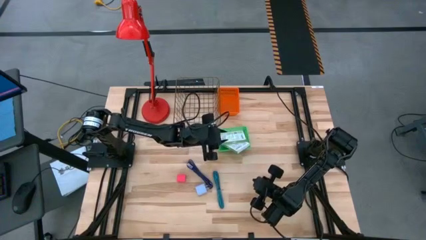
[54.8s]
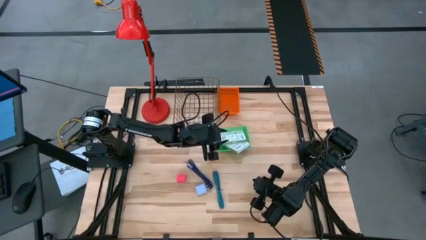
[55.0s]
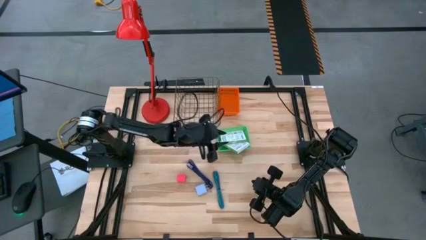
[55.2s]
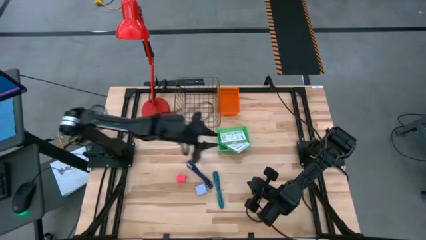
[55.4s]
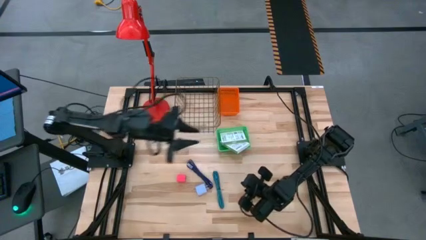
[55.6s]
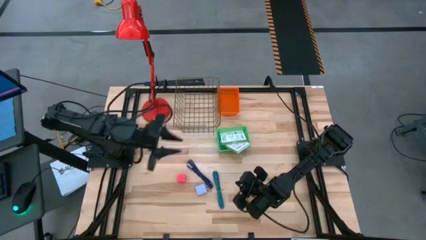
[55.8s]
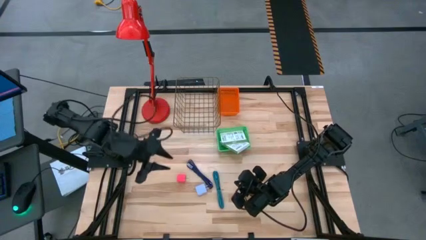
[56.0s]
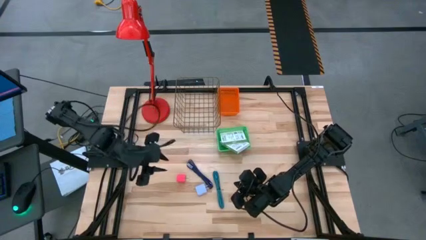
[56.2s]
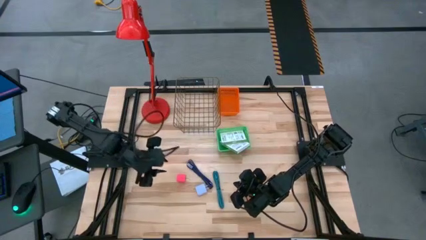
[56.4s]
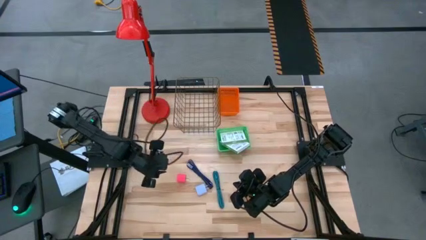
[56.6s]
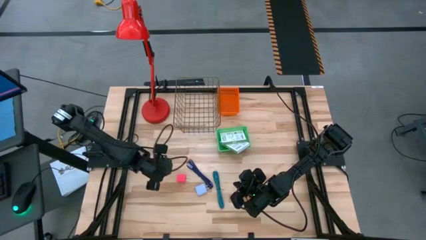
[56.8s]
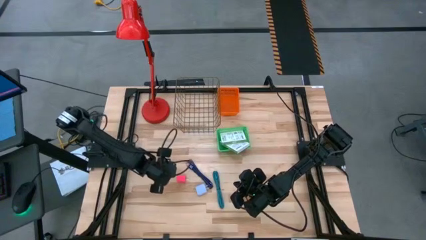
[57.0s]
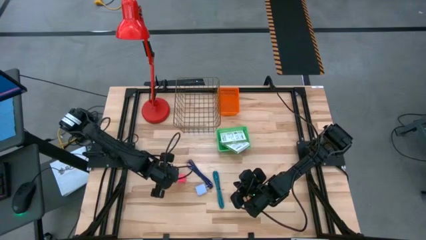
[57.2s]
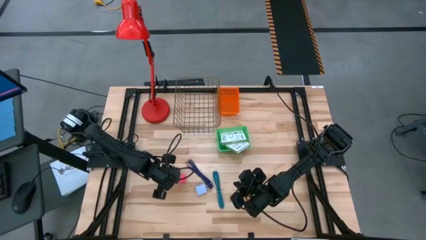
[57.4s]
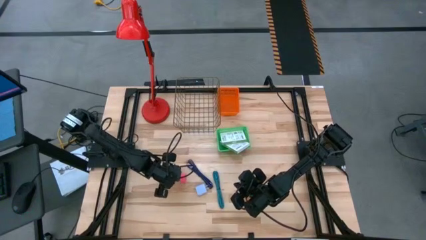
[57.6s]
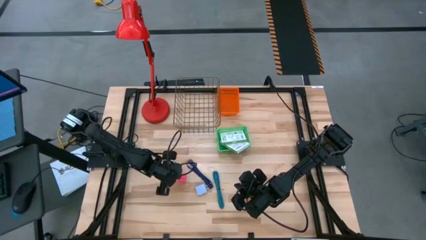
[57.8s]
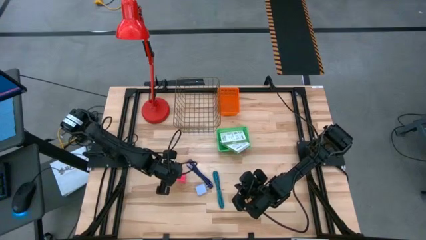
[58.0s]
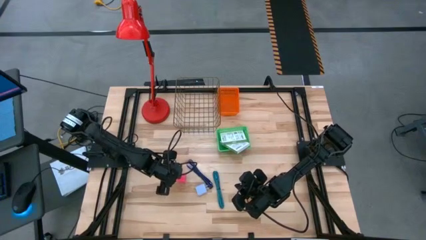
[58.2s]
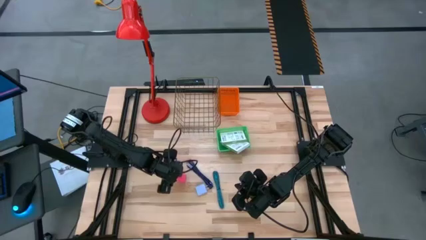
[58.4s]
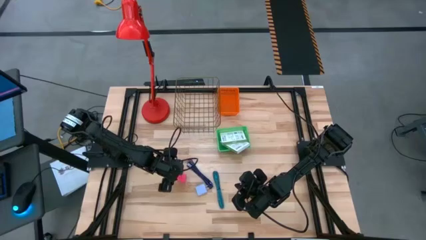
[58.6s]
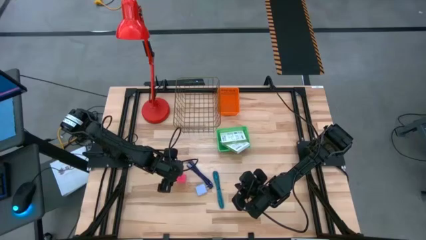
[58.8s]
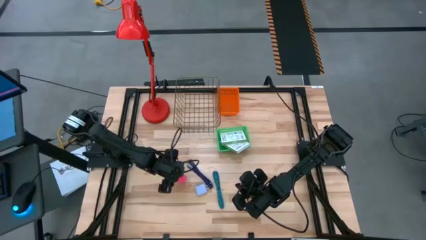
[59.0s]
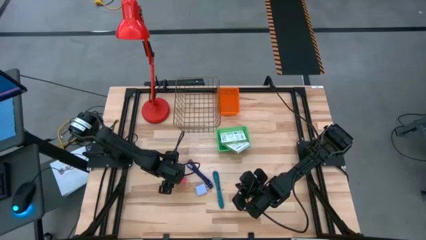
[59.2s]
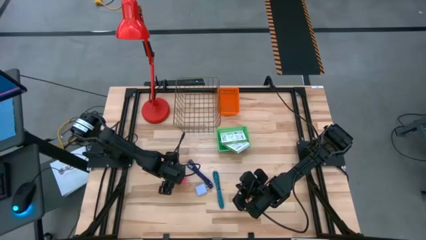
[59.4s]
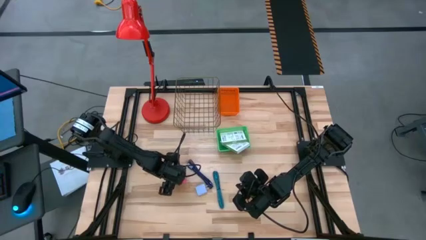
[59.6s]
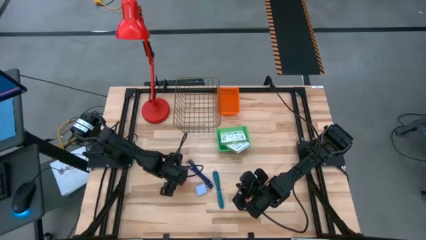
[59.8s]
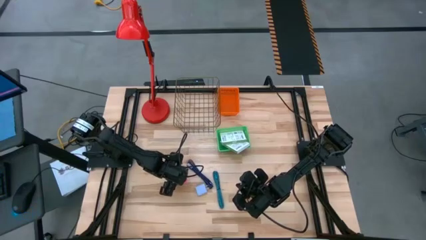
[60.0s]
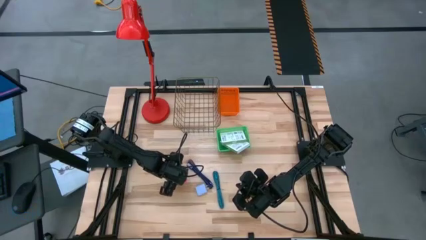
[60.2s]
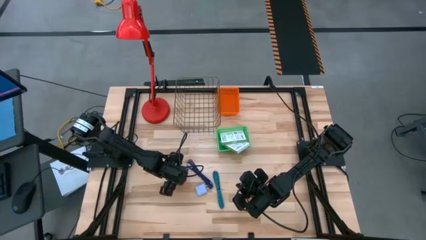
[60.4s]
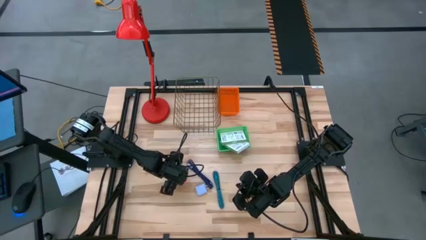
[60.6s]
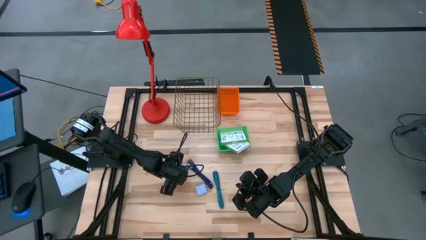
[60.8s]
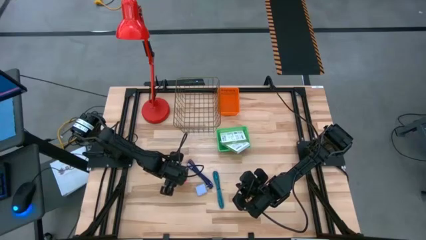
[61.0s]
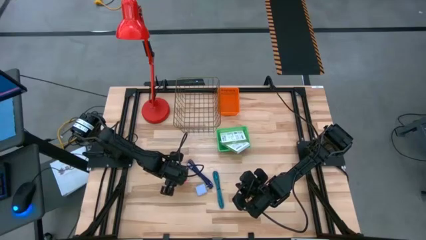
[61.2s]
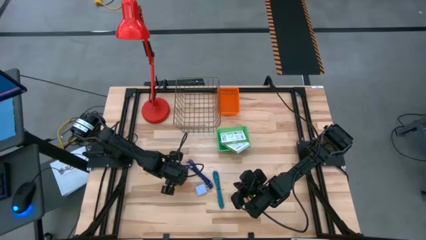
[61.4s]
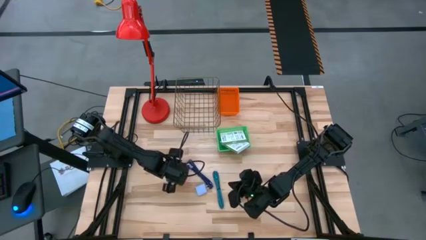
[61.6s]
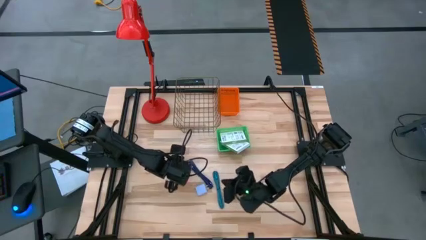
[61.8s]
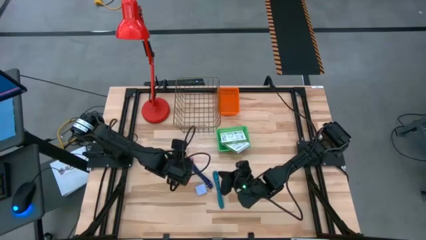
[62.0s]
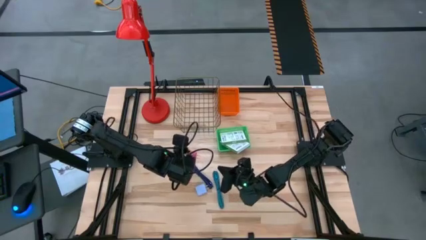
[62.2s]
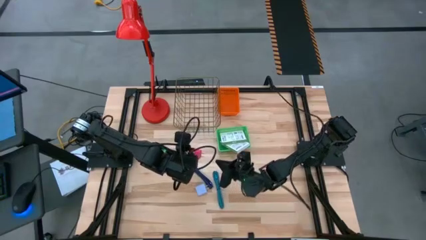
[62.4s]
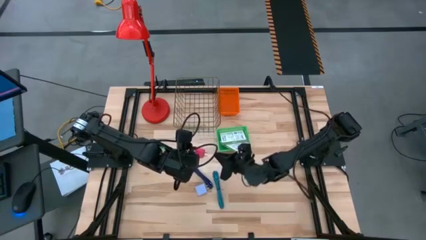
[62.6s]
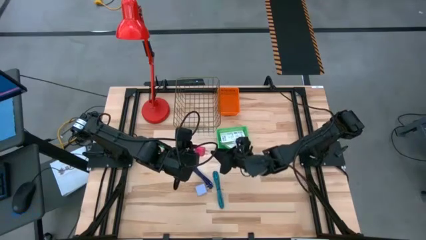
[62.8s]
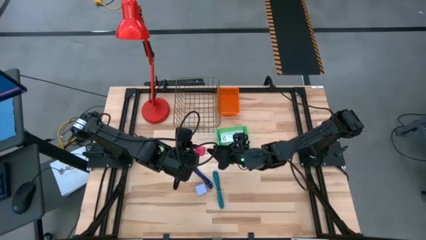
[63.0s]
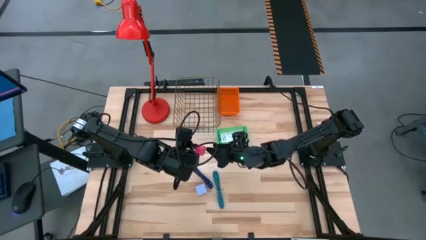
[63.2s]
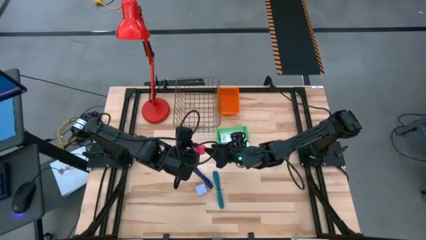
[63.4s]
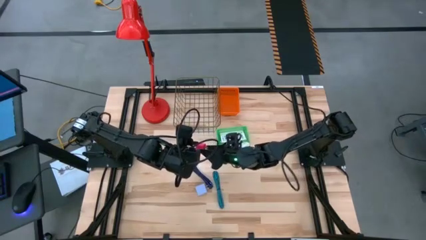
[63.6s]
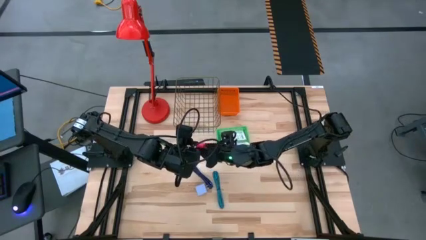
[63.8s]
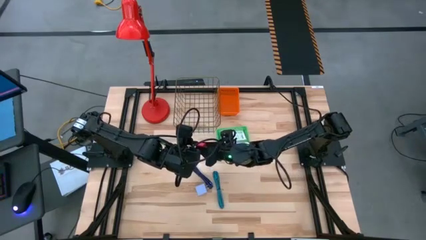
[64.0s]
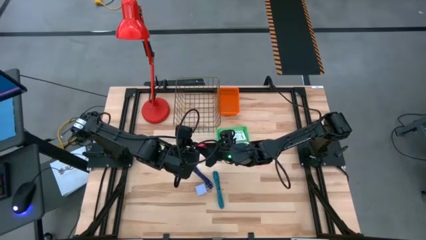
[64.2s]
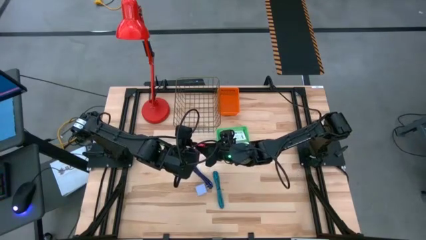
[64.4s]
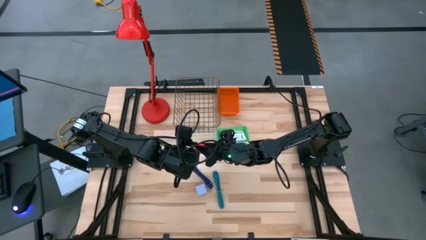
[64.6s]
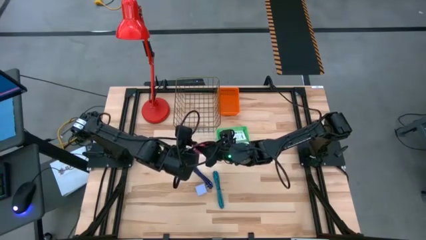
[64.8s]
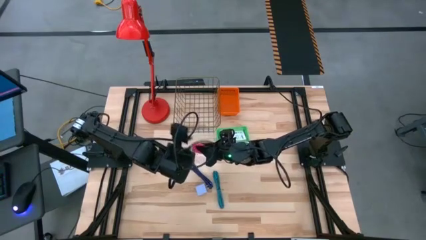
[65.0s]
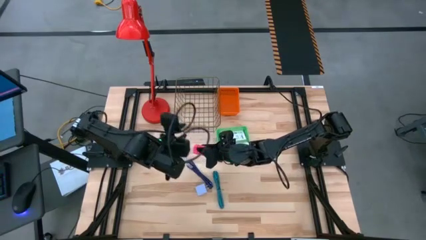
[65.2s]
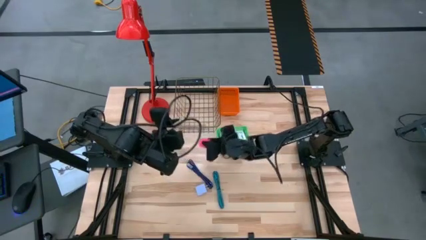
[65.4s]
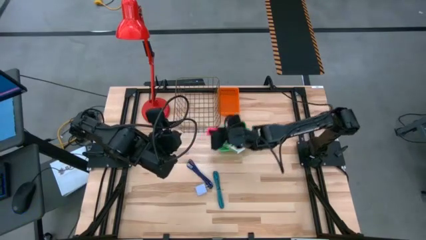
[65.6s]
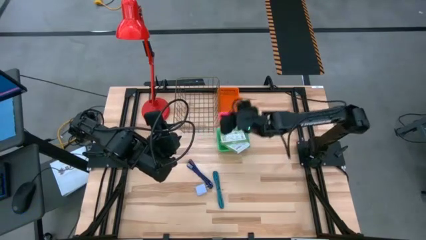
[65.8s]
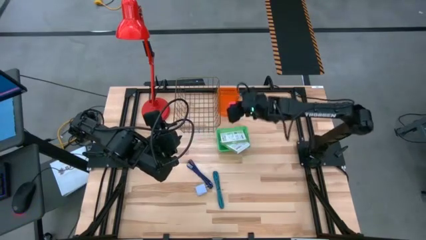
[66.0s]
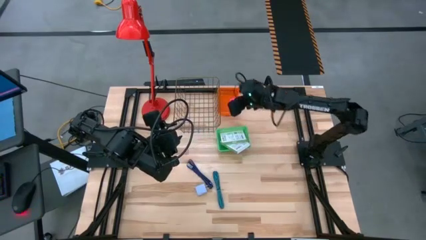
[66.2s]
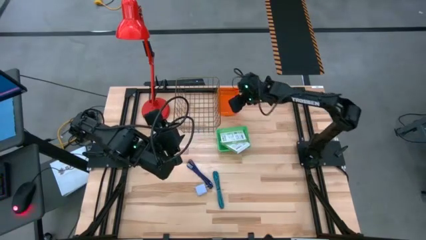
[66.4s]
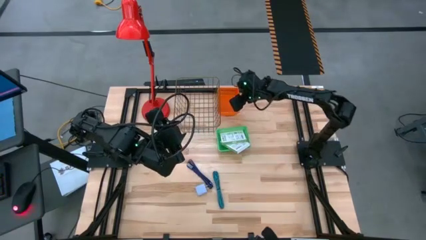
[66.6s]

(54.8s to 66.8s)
Task: Pick and place items into bin
Put the pink charger adapter into the orange bin

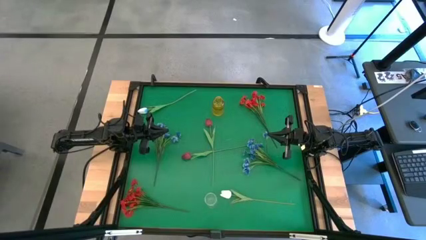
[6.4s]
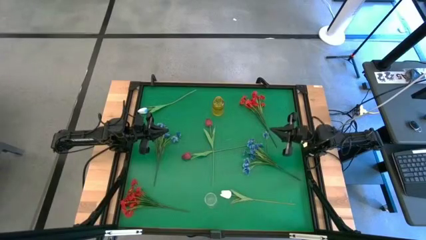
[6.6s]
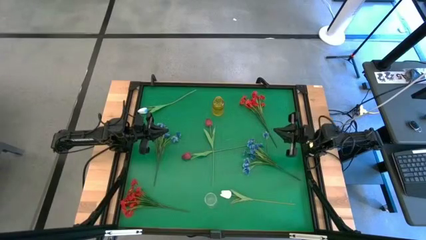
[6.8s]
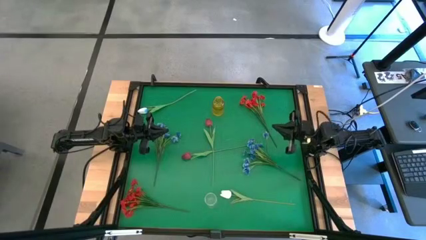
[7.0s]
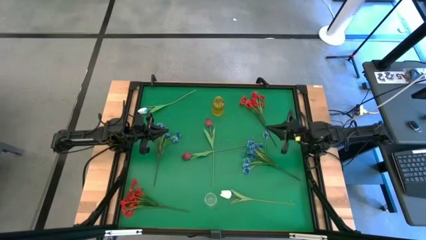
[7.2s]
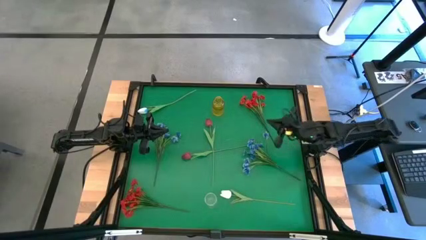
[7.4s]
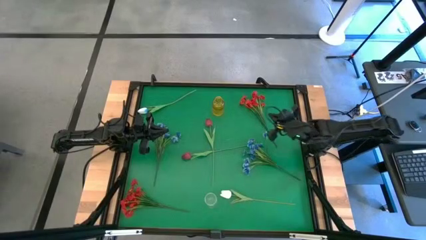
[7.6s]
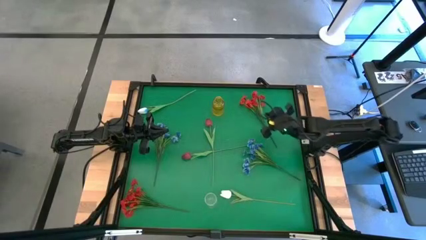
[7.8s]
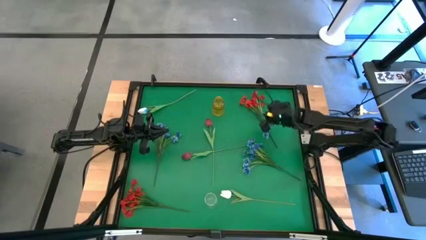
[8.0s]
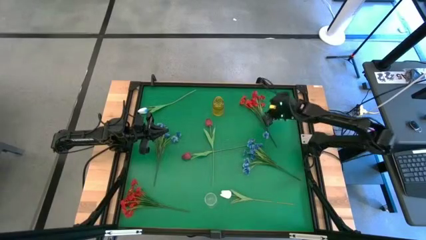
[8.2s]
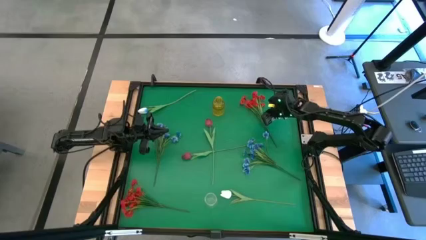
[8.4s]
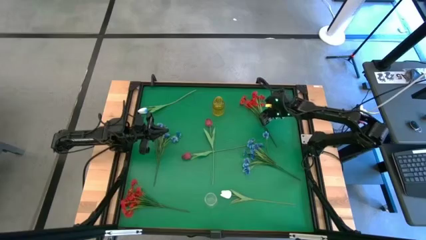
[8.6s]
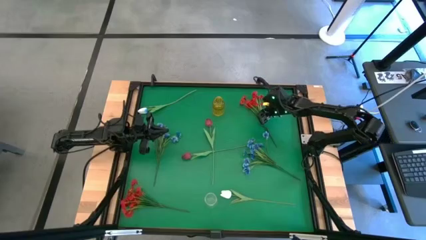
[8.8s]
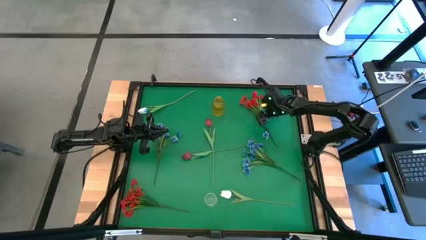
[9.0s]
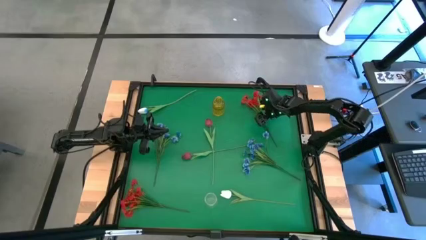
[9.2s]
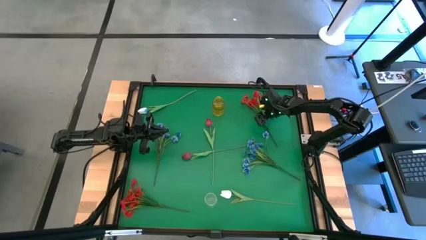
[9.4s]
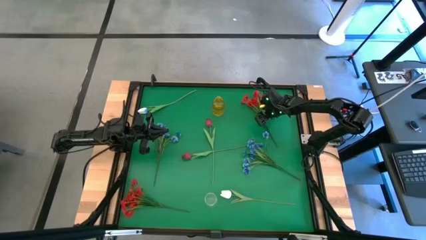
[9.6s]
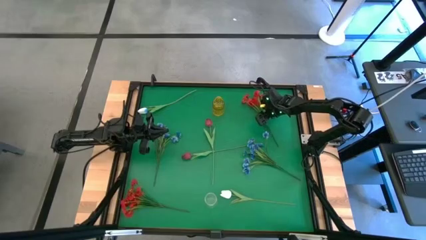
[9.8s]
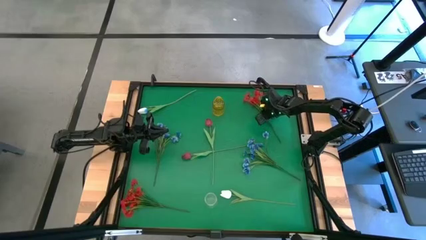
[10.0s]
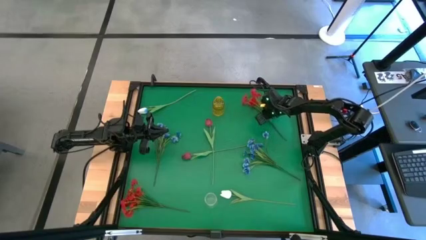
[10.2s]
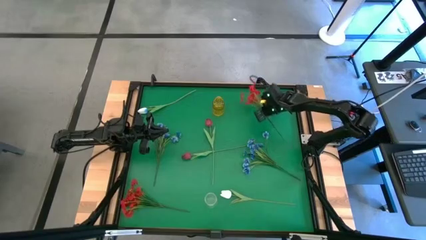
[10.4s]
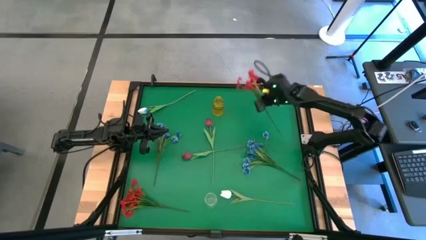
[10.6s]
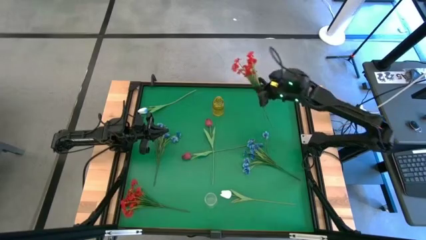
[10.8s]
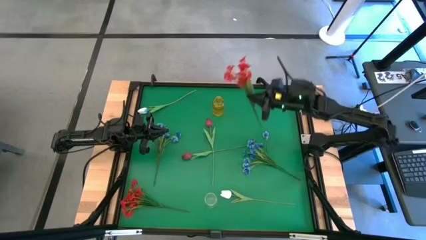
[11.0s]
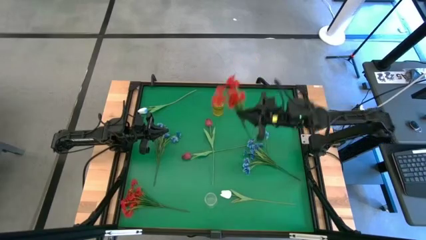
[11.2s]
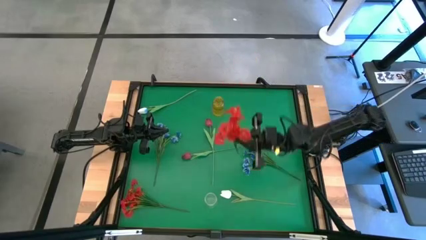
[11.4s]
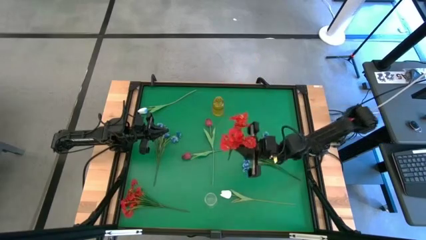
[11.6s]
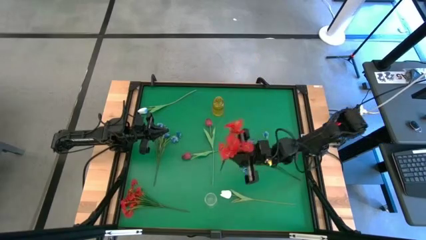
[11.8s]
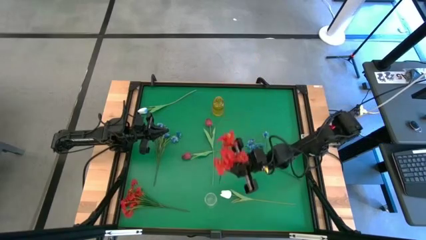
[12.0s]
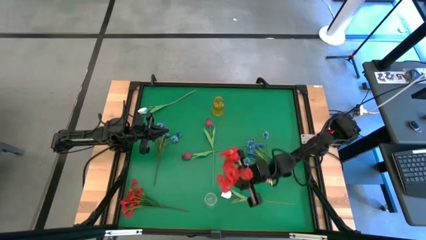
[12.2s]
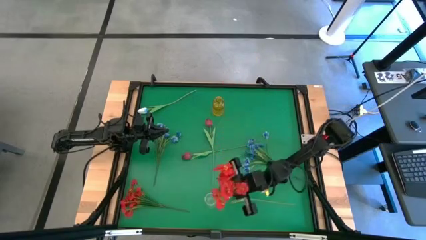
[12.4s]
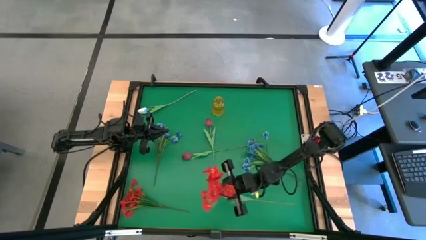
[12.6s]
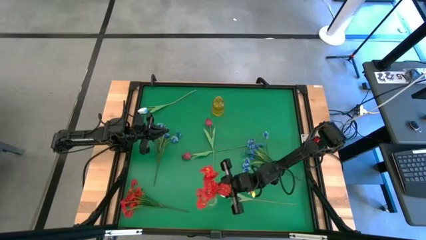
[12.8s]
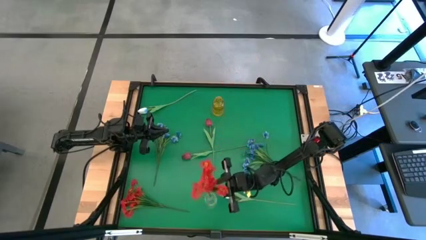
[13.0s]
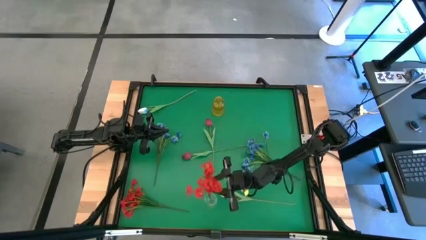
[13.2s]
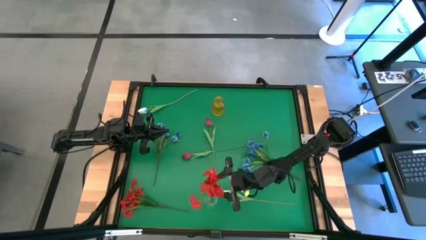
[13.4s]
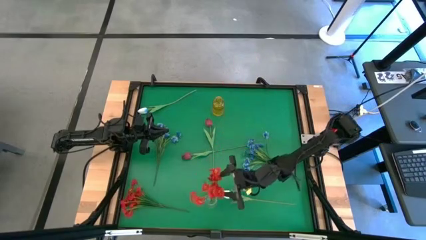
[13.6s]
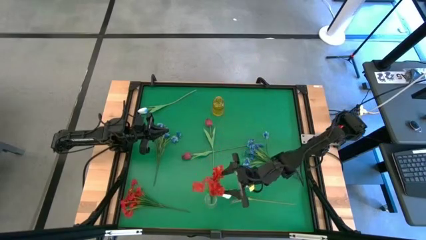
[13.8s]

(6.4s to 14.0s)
Task: Sort flowers into vase by color
Put the top red flowers into the transparent bin
